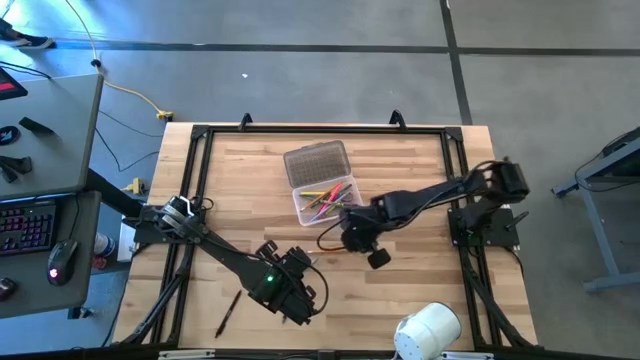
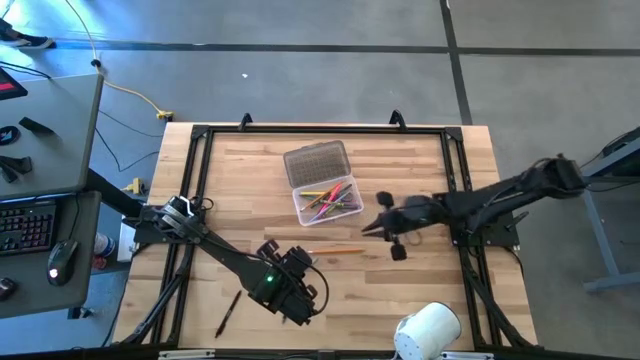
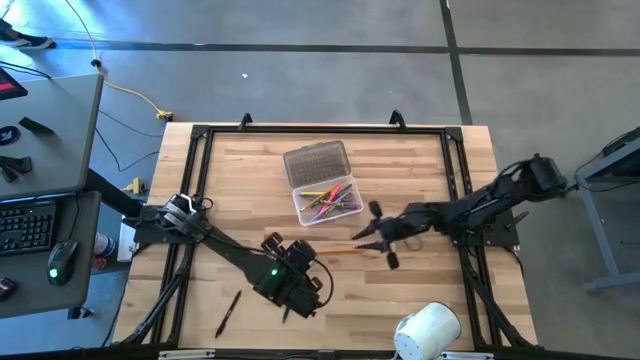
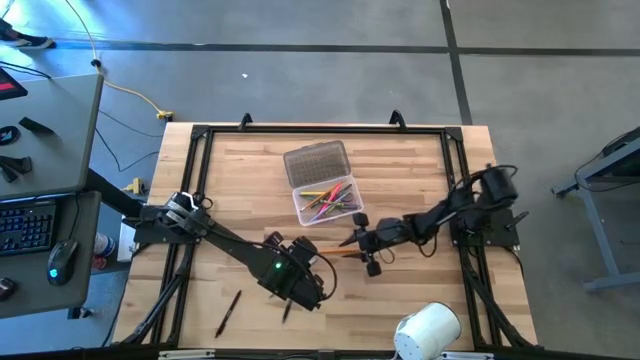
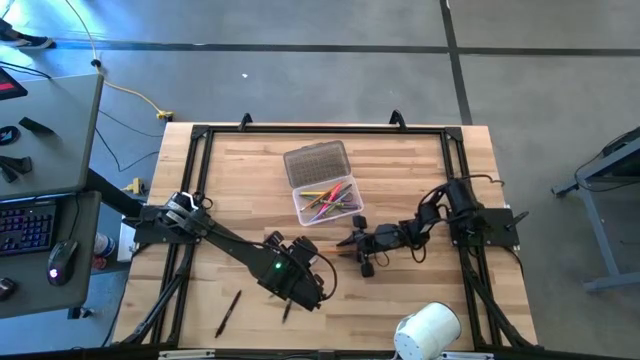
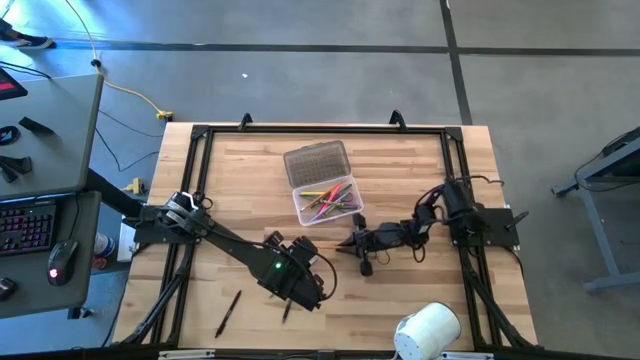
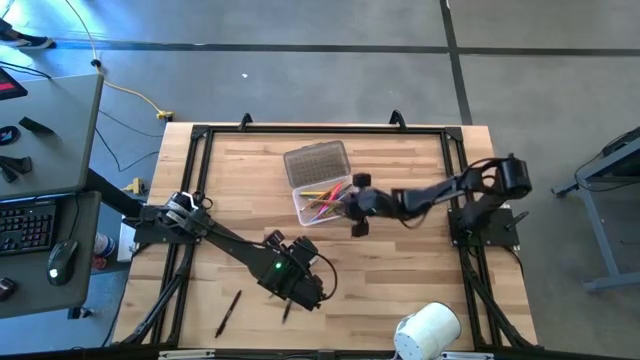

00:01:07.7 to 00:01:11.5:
Task: Pick & place school supplies into a supply box
Put the orange pencil into the supply box

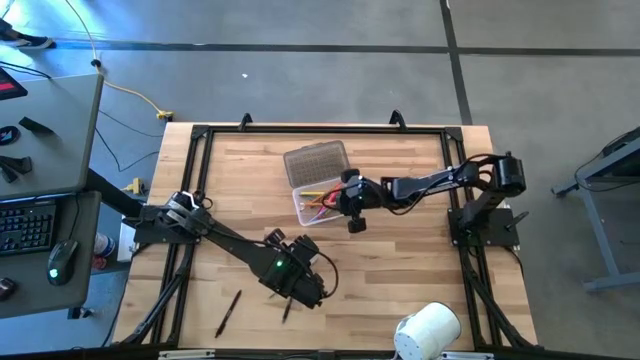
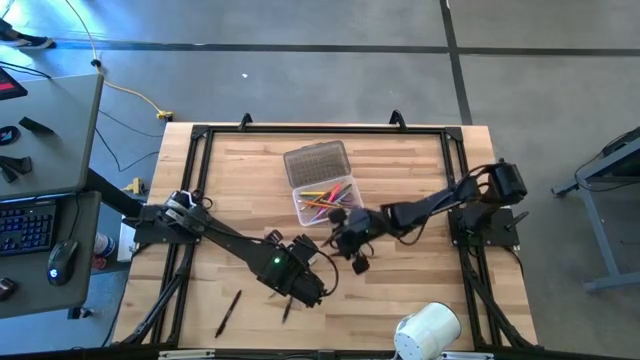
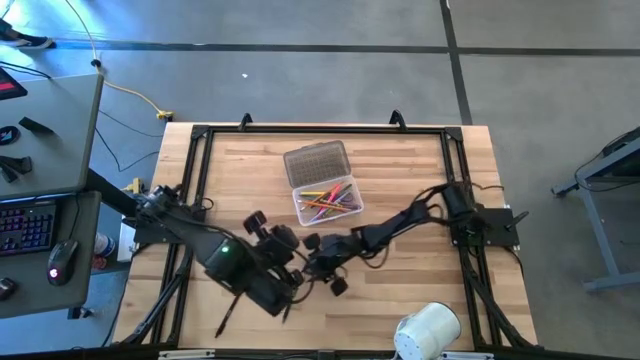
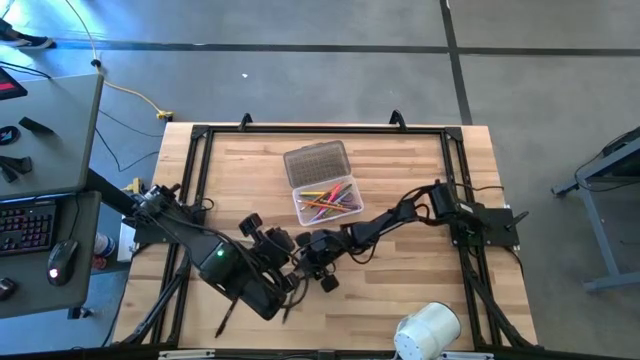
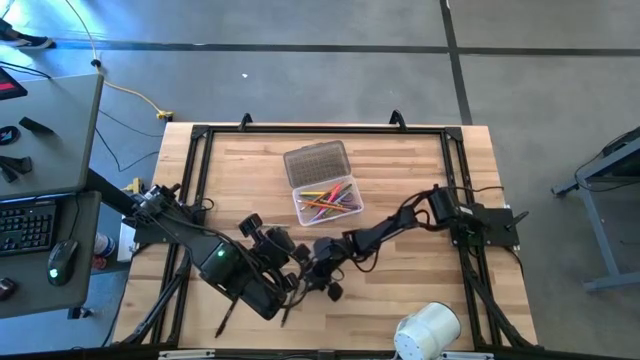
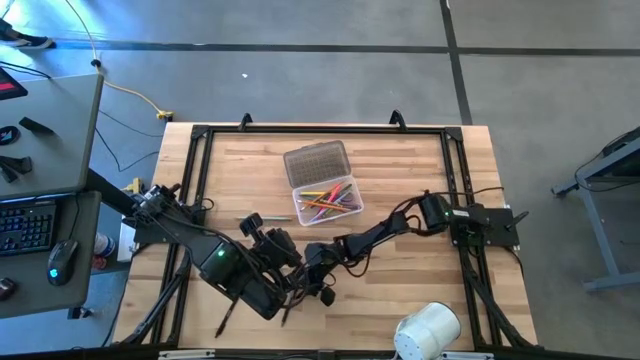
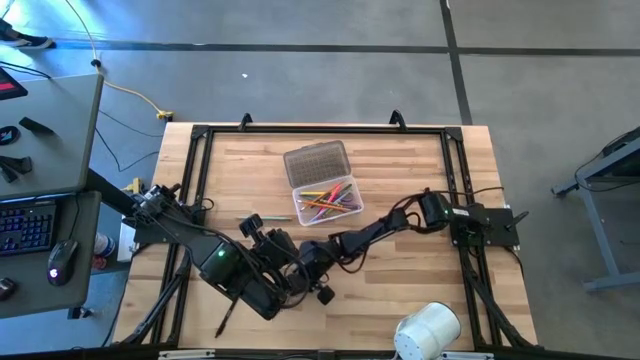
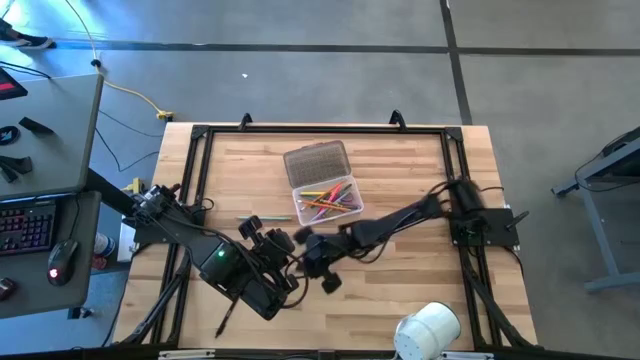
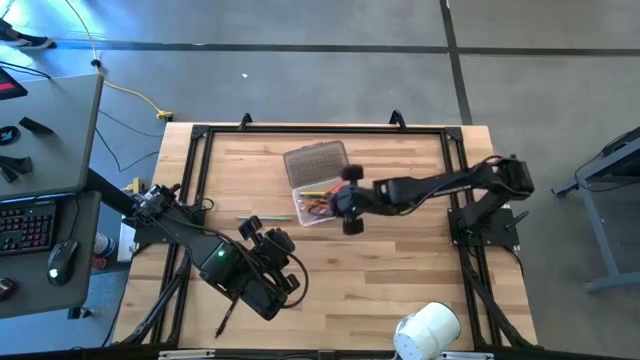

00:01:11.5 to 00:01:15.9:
Put the right black pen into the supply box

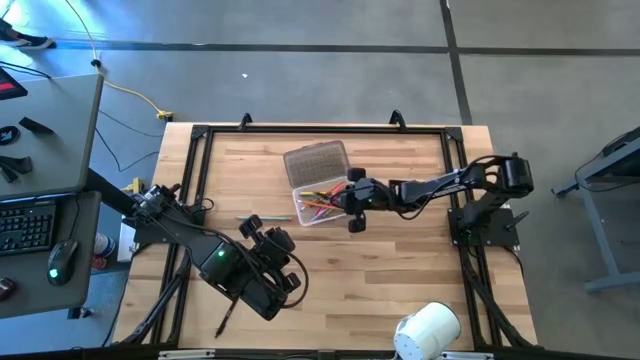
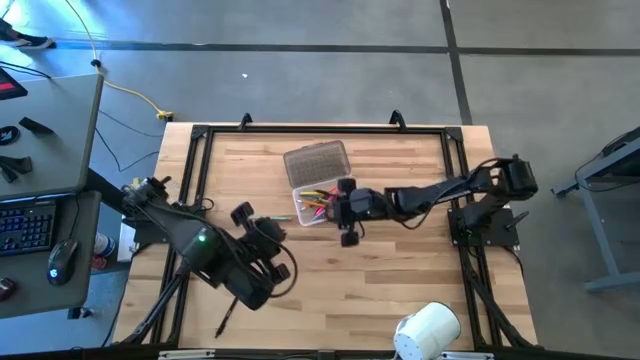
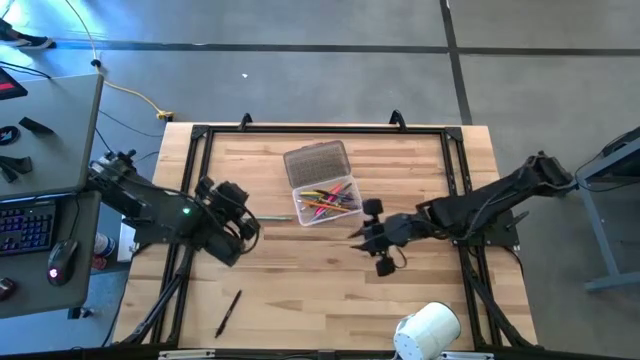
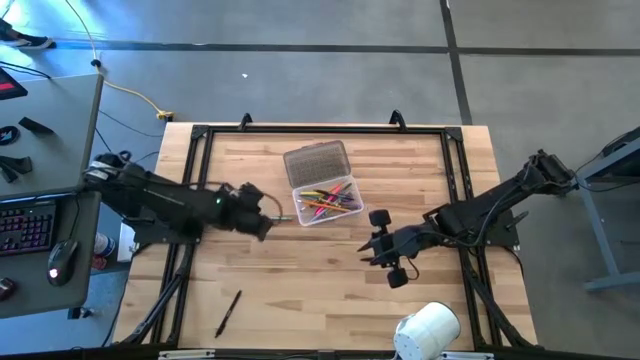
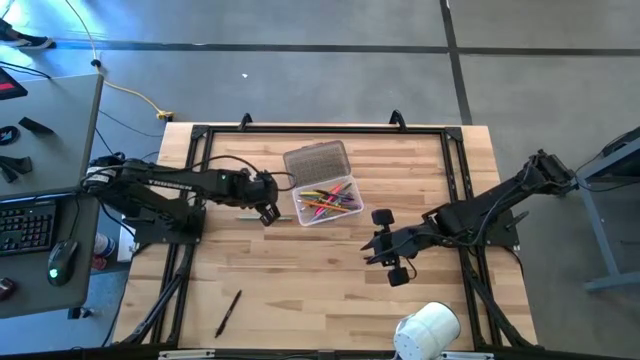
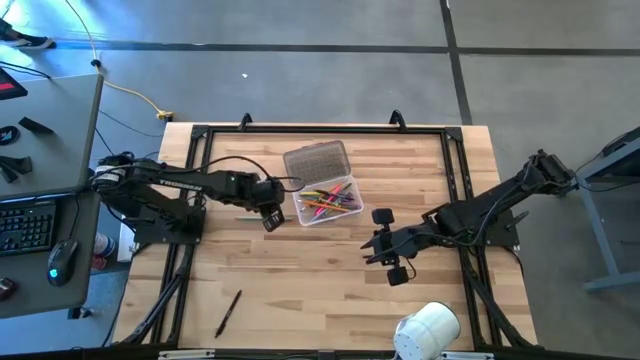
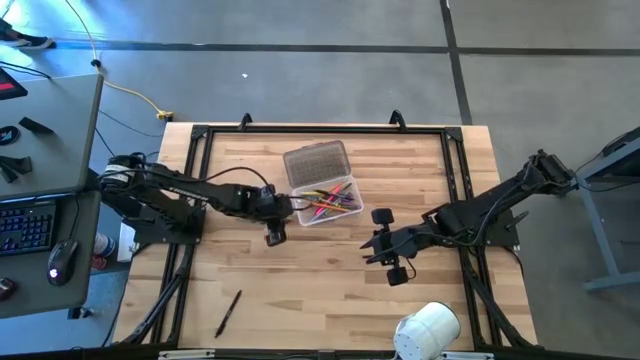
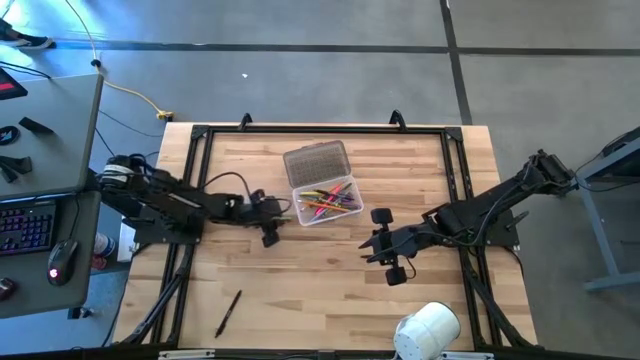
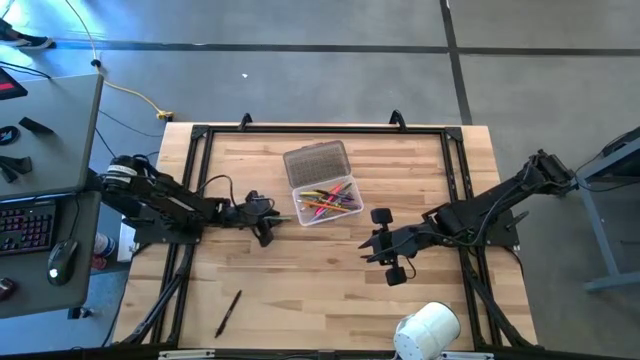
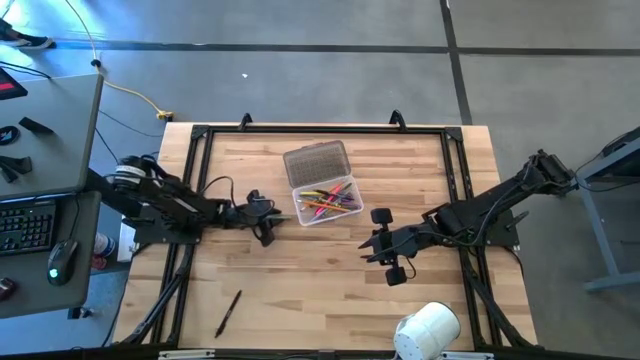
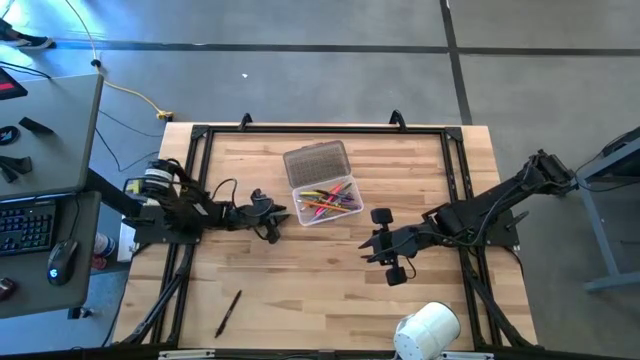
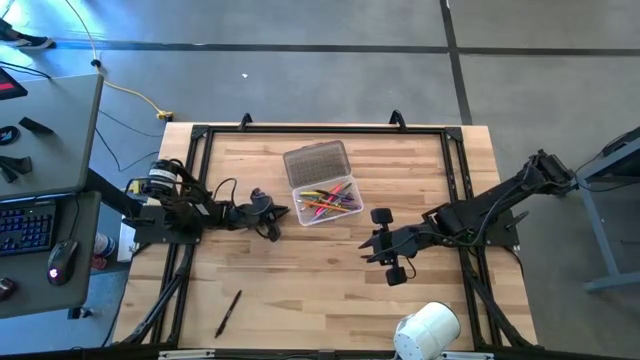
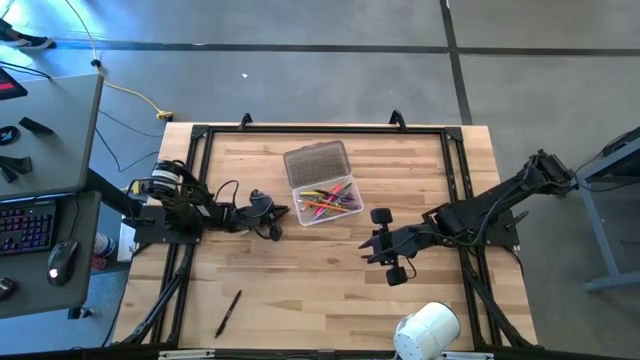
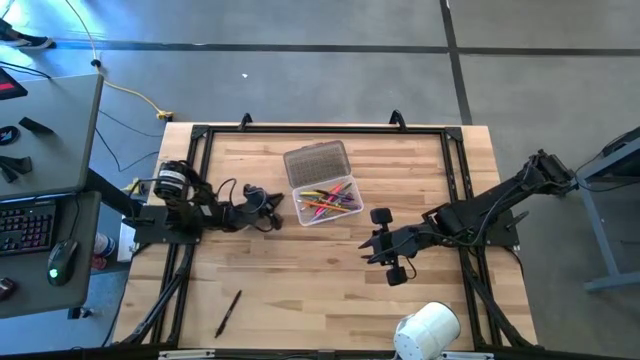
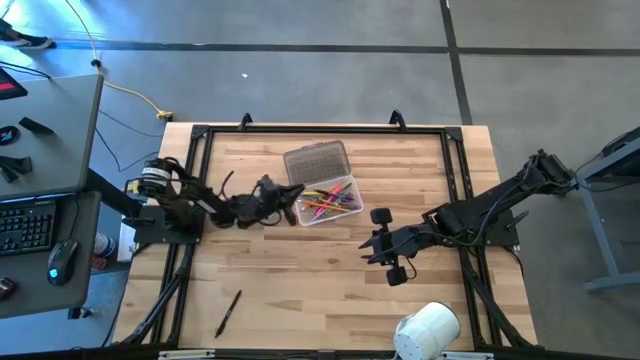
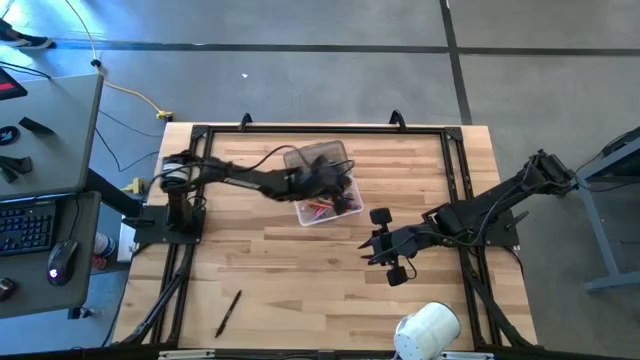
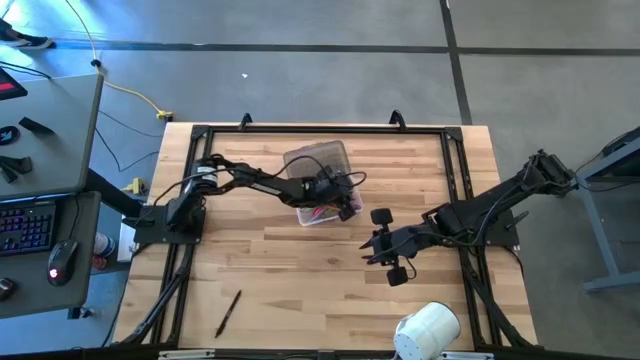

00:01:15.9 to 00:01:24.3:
Put the light blue pencil into the supply box

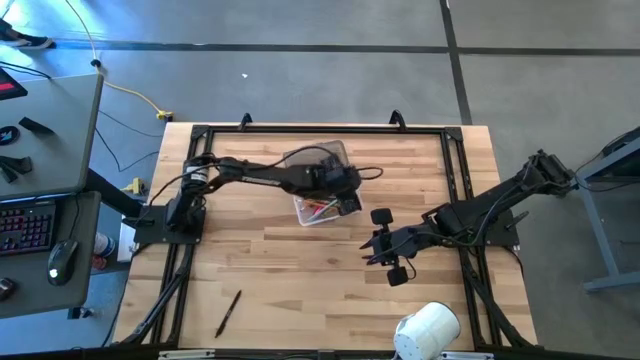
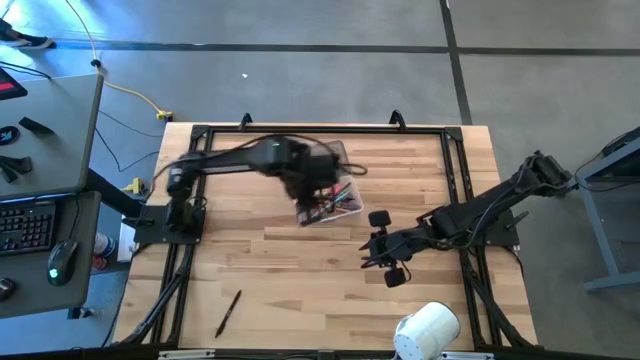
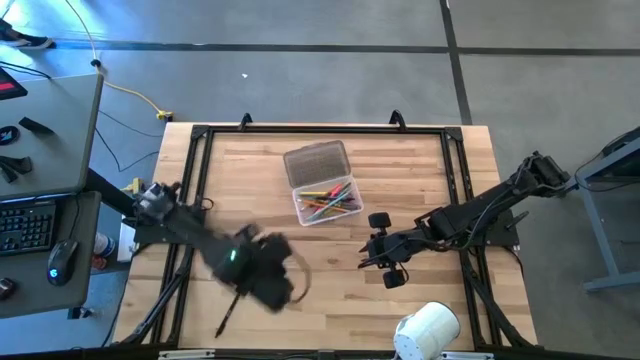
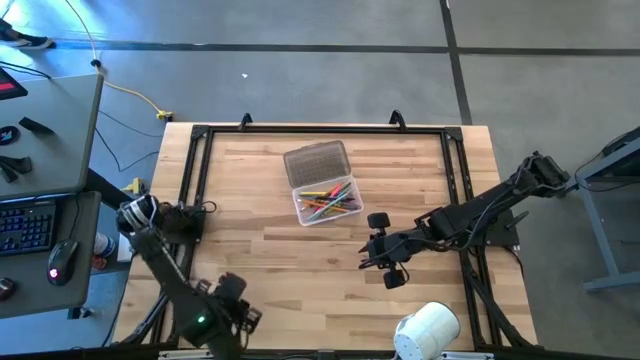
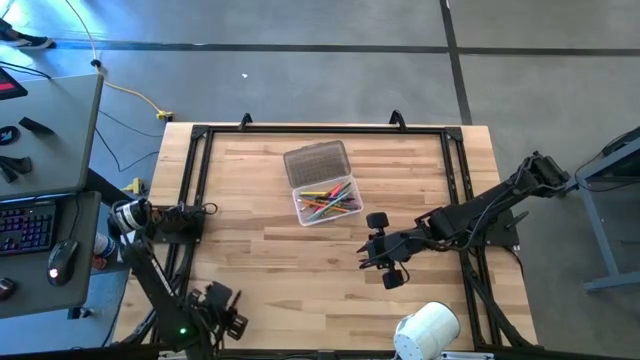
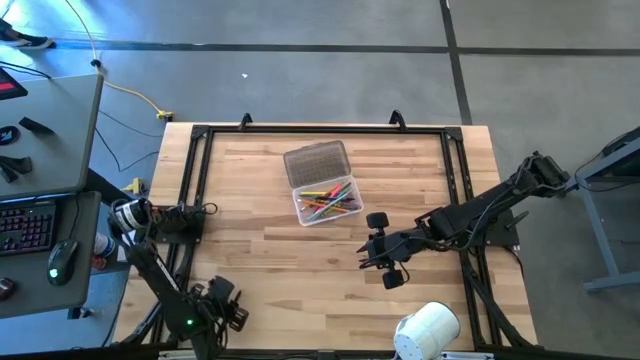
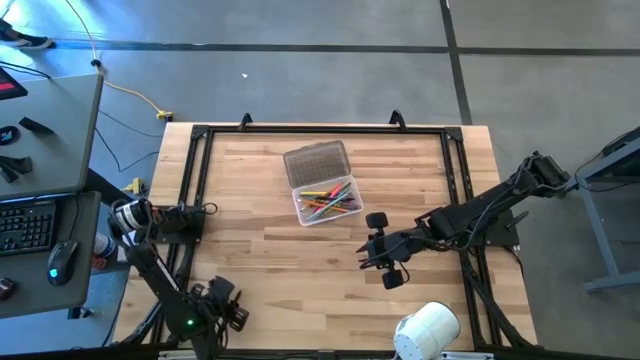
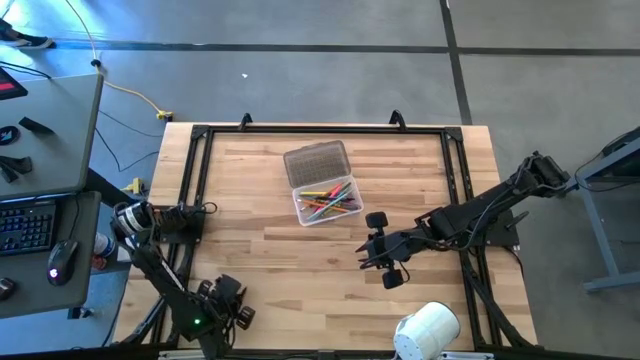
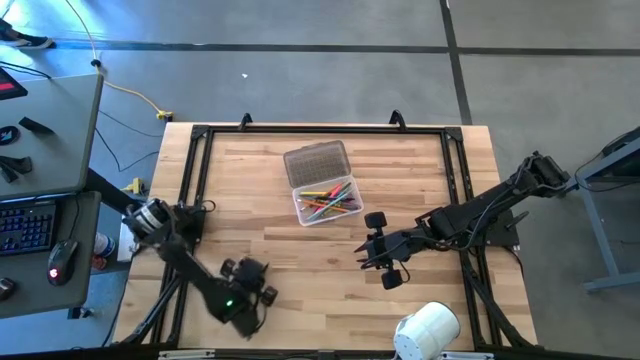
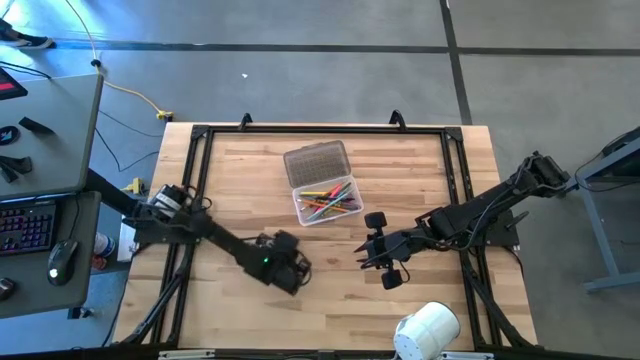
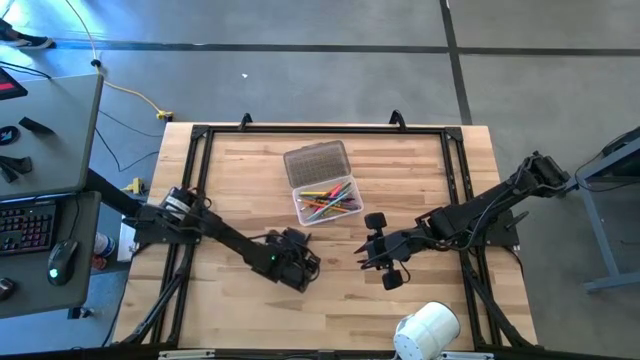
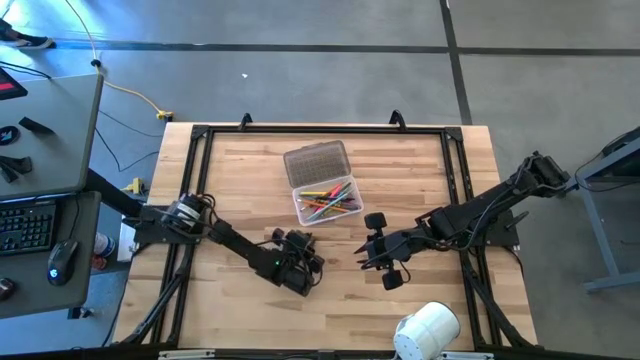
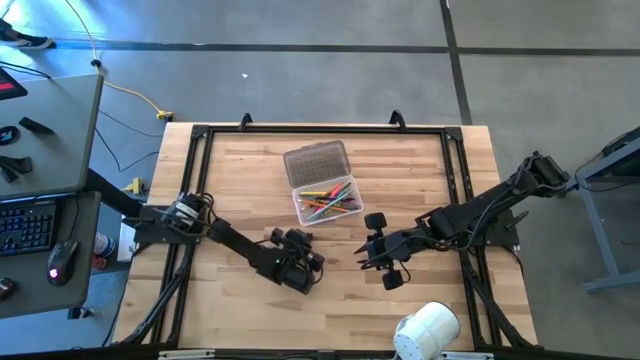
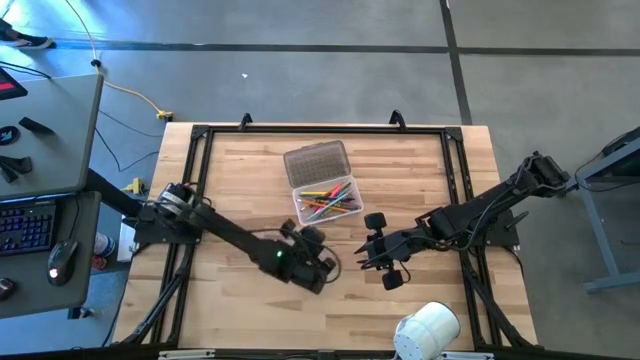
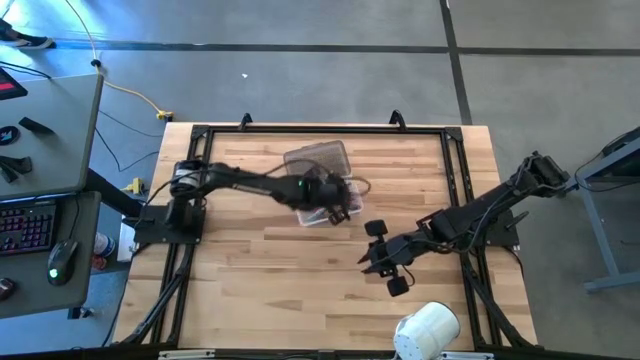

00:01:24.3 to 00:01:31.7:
Put the black pen into the supply box
